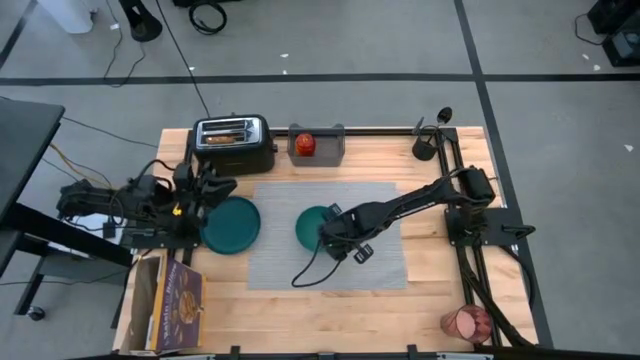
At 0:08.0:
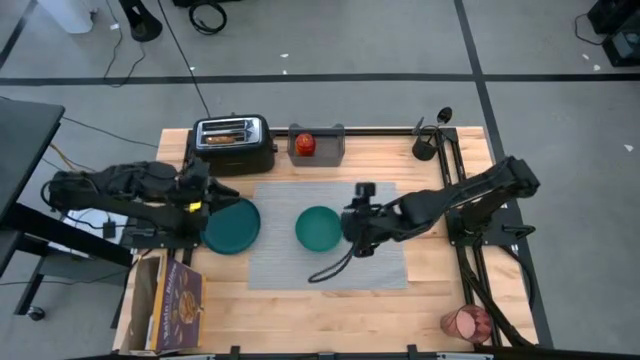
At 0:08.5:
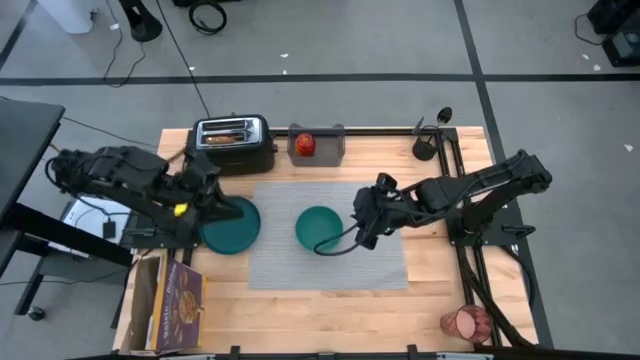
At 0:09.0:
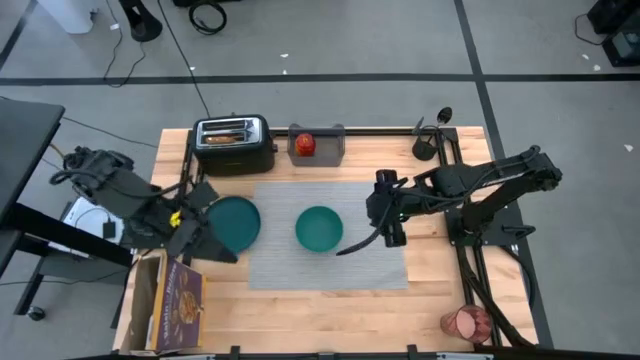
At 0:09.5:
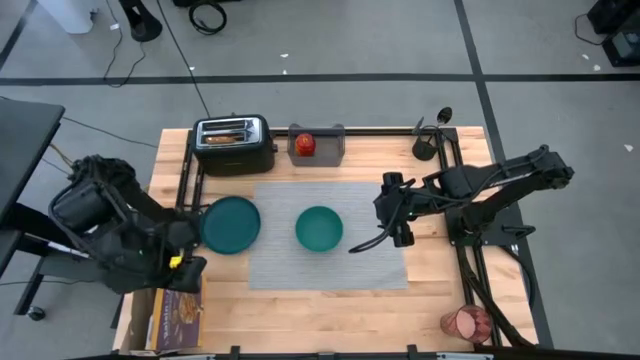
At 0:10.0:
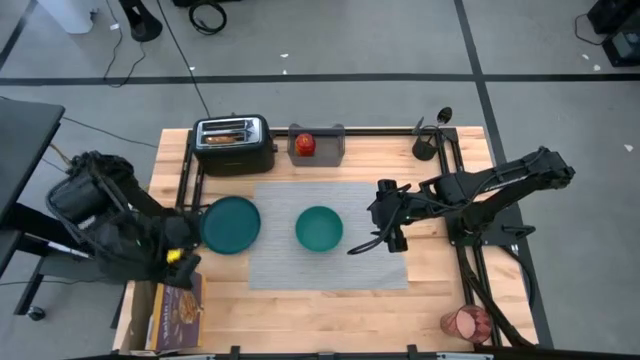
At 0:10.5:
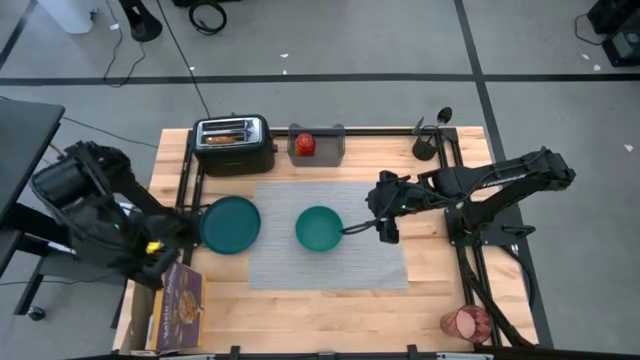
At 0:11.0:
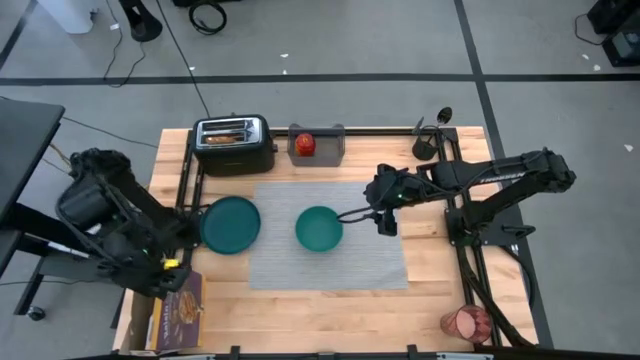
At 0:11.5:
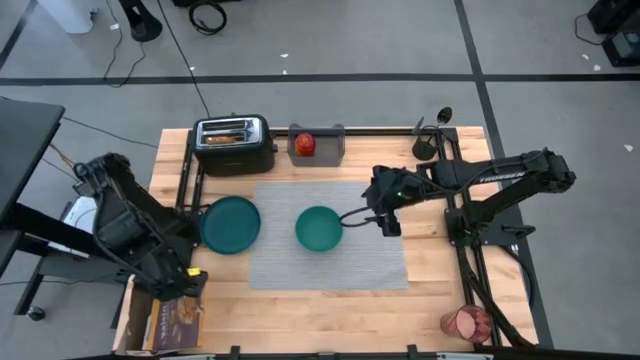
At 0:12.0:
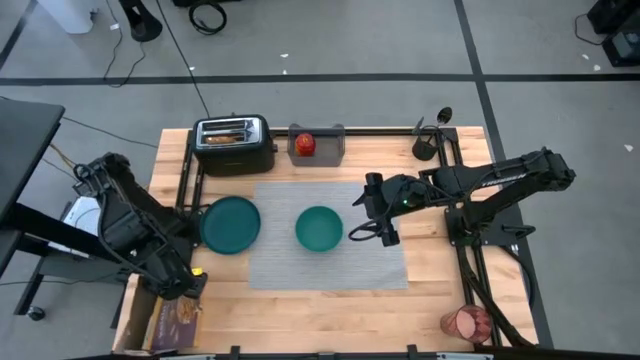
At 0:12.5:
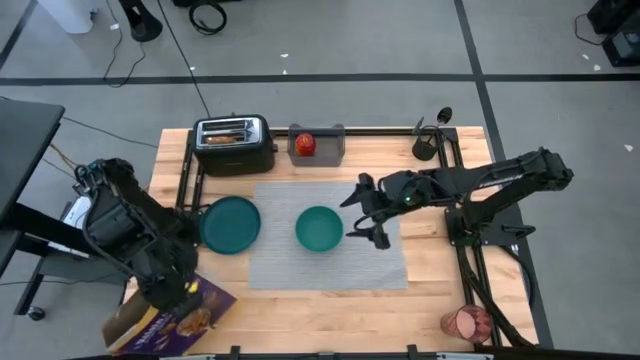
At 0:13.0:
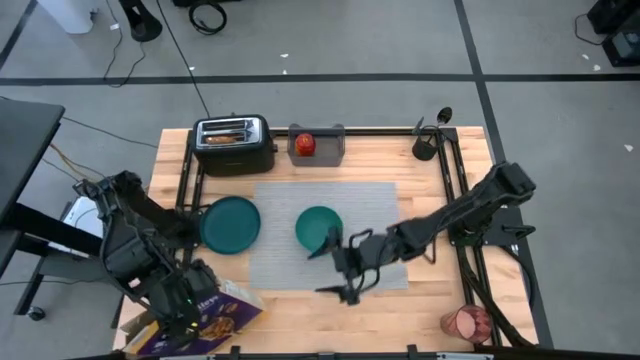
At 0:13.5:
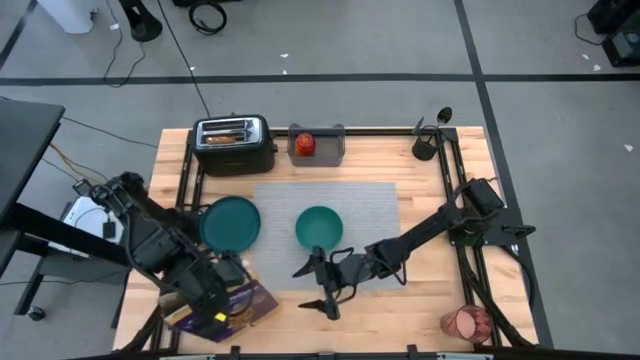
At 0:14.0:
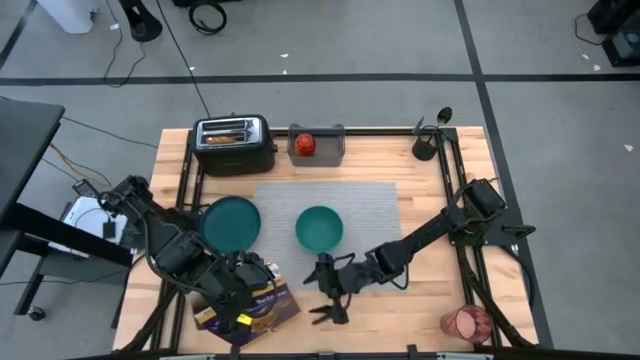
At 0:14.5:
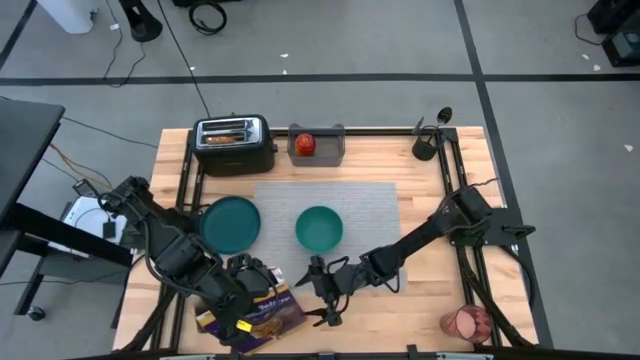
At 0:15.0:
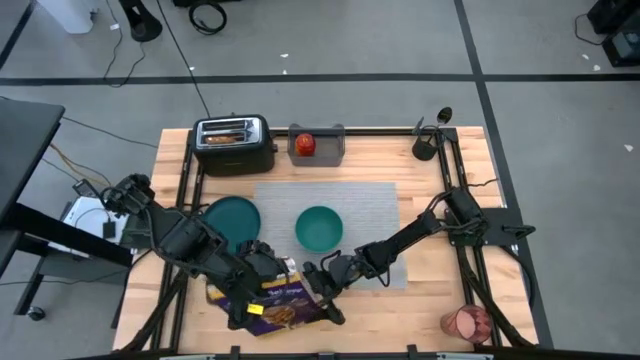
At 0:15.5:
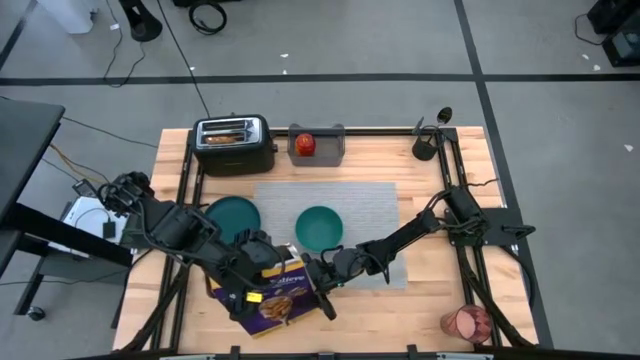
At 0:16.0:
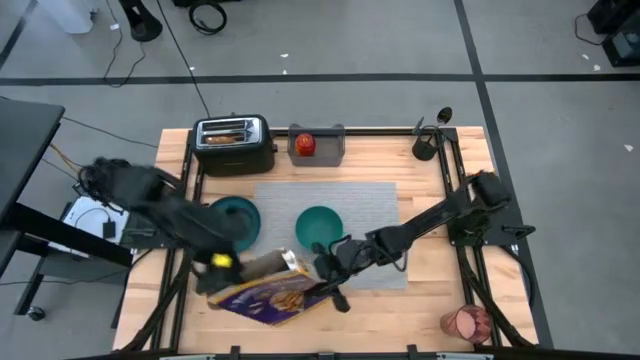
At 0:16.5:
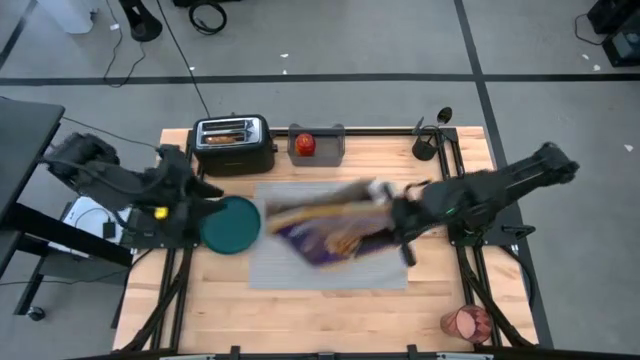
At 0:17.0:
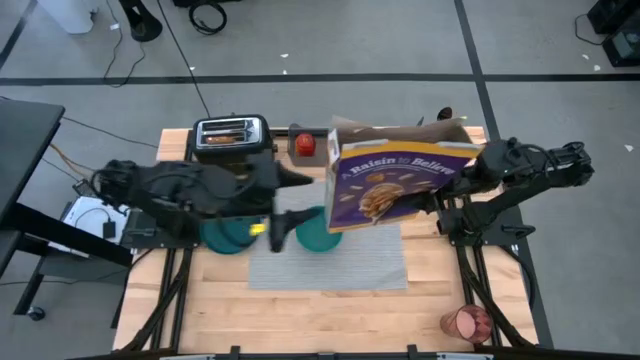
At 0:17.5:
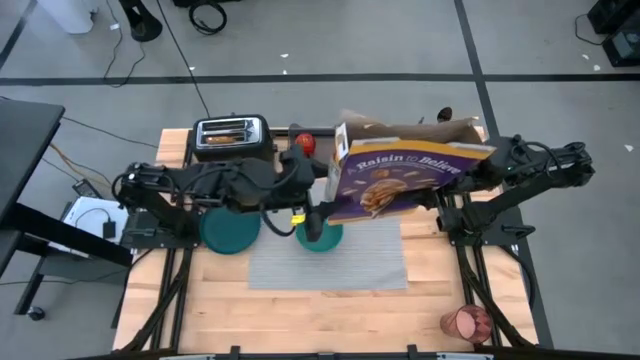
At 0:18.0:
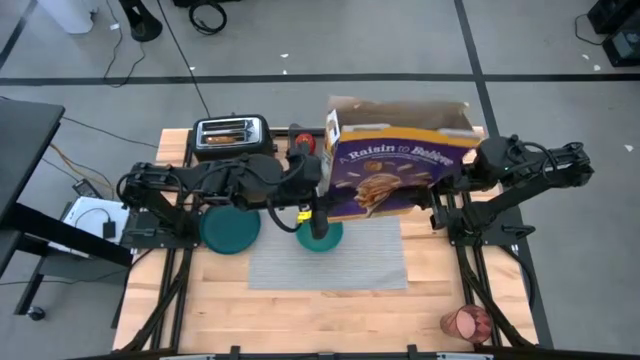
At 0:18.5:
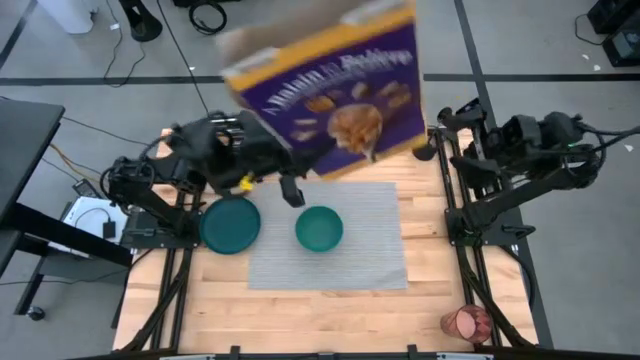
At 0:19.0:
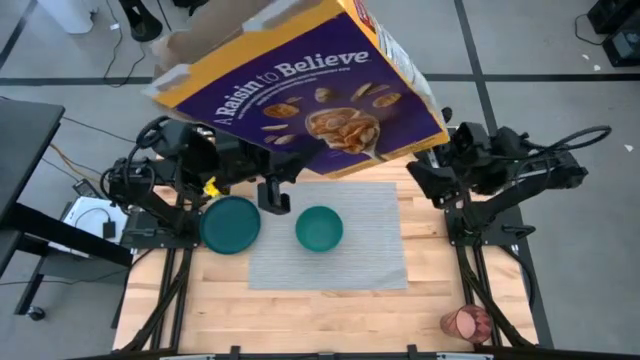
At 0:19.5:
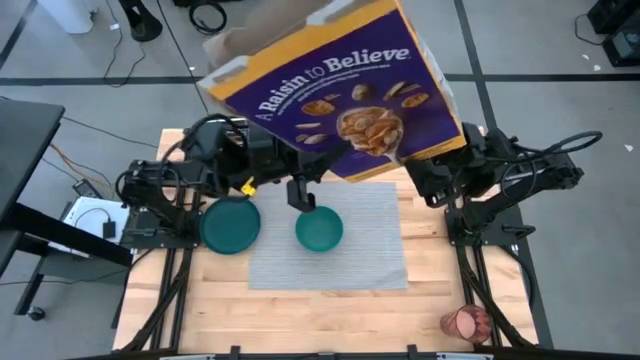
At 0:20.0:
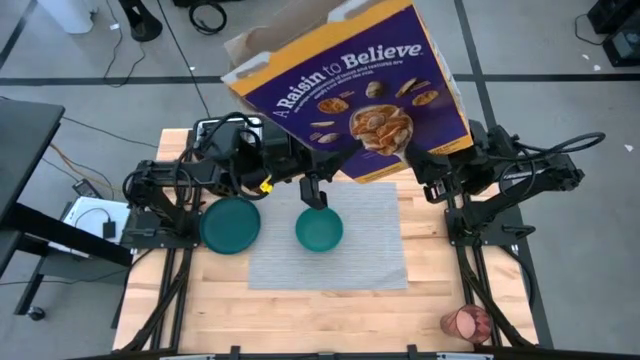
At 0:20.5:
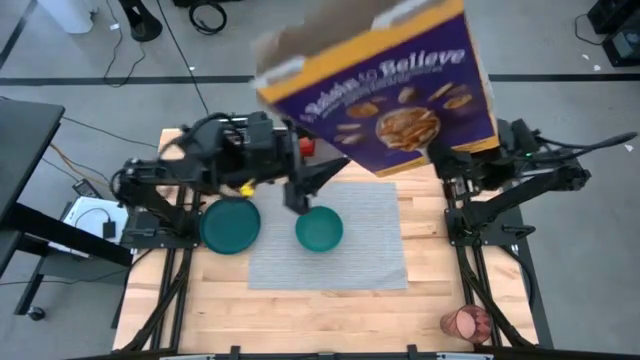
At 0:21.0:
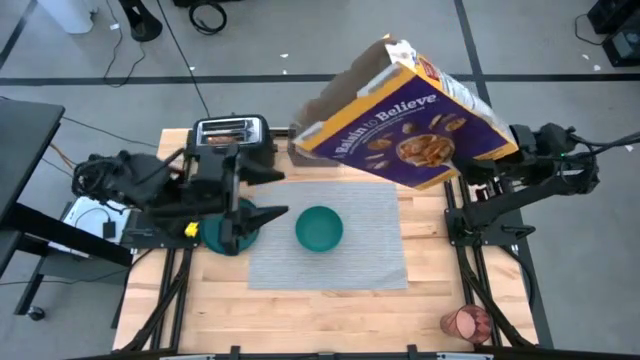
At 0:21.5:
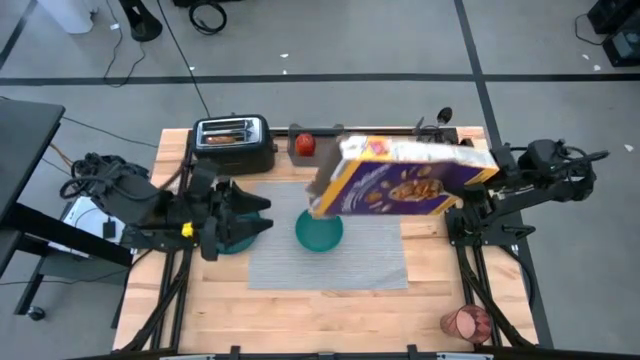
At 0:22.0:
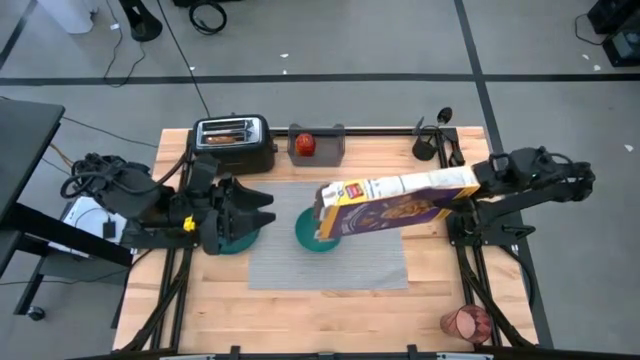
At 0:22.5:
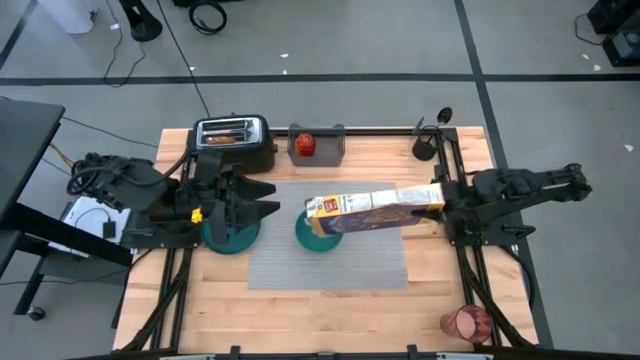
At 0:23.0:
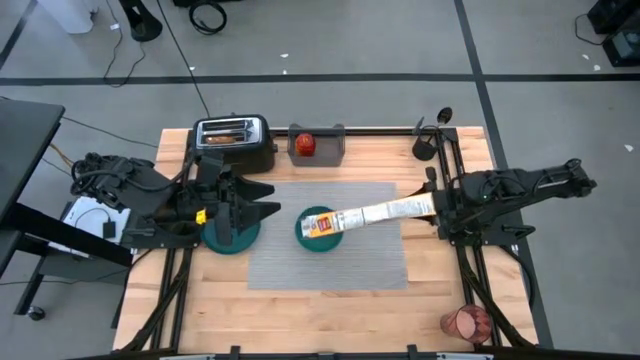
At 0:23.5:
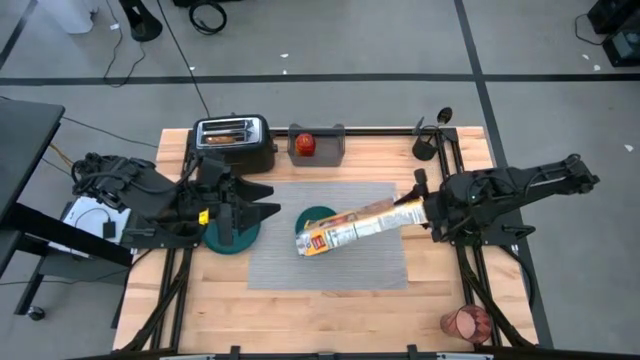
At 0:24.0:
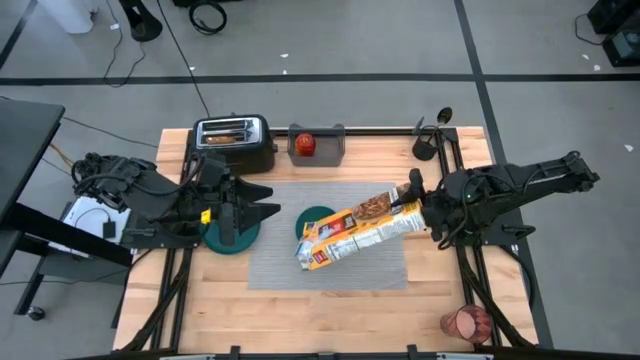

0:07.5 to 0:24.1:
Task: Arrange a breakfast setting
Pour the cereal on the green bowl

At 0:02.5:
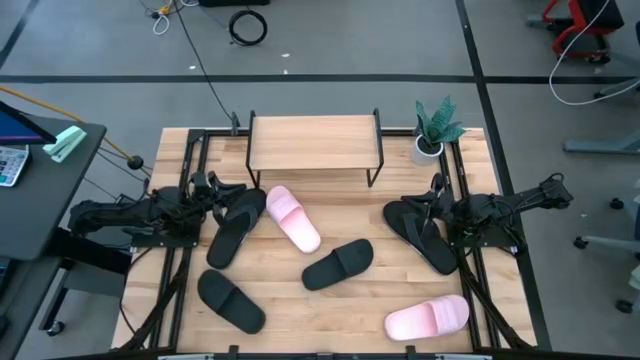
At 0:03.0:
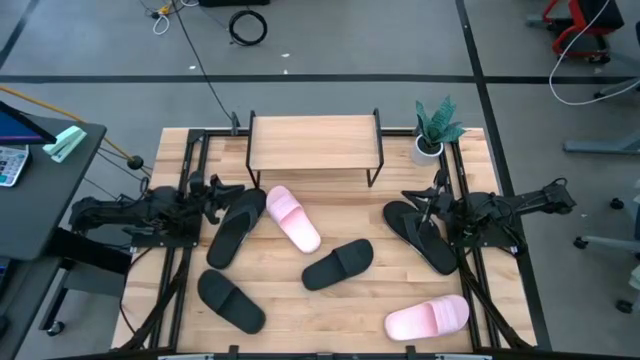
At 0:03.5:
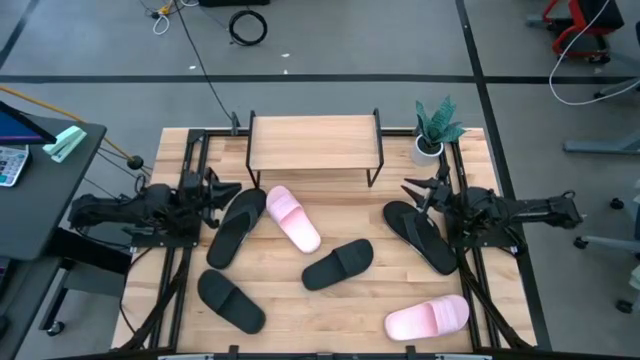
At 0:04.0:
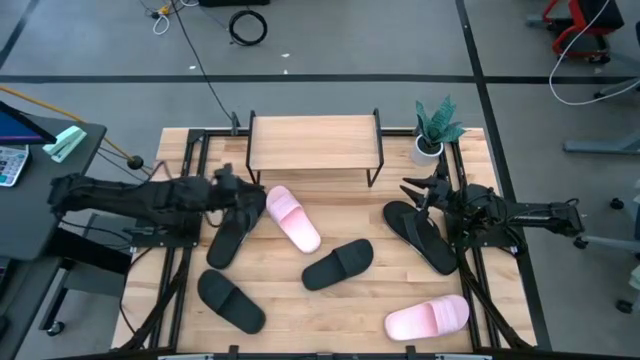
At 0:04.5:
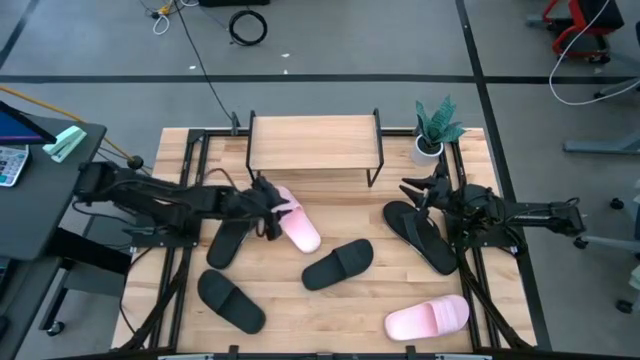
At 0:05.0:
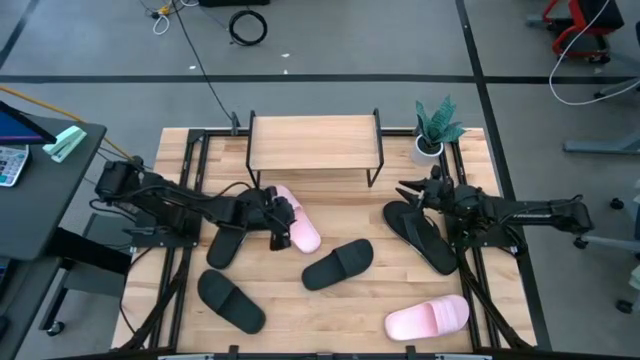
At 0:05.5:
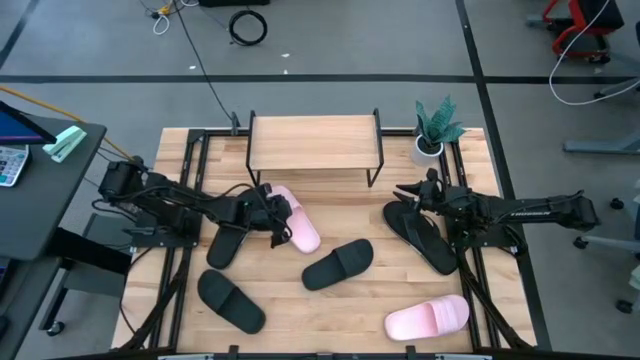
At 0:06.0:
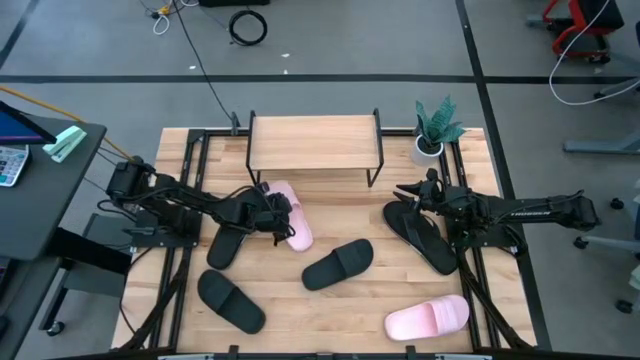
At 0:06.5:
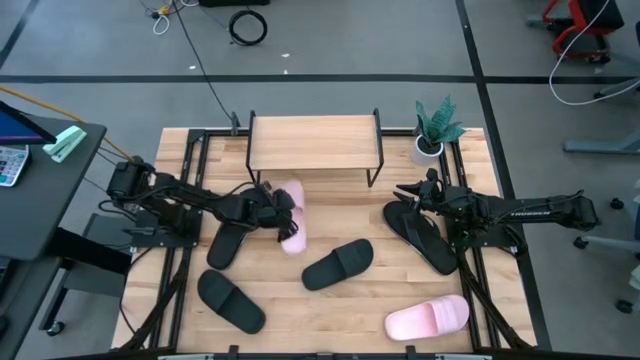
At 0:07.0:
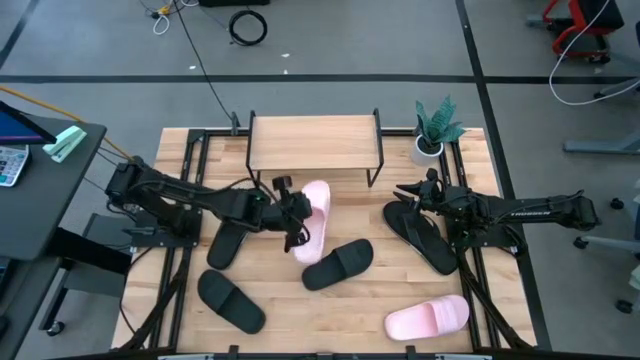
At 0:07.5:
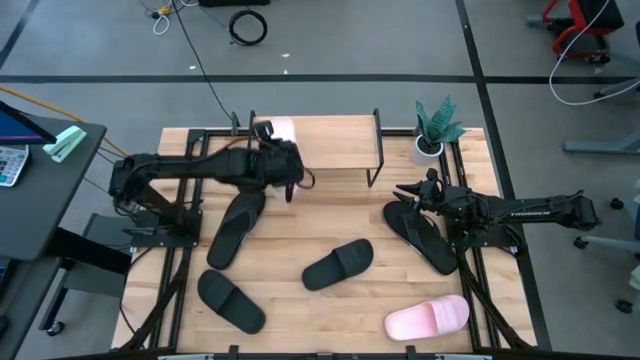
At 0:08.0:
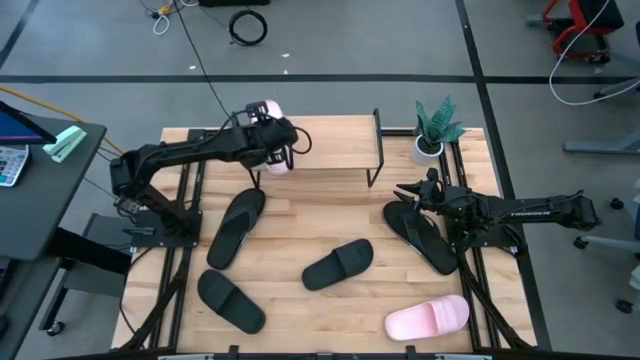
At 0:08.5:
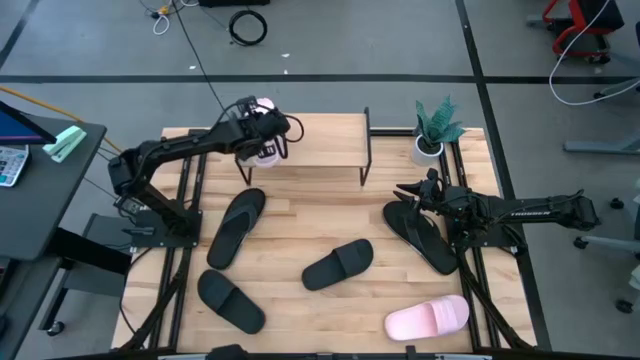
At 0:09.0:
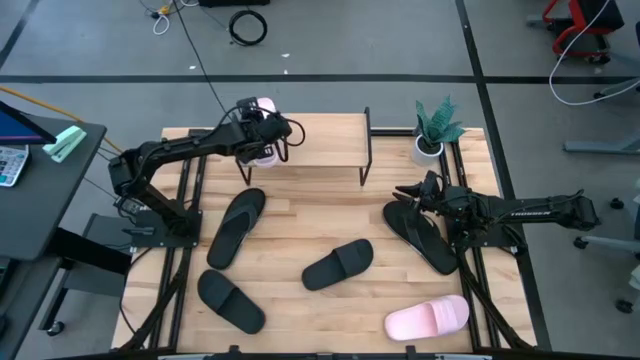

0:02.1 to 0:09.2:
Task: Pick and place slides into the shelf
Put the top pink slides on the shelf
